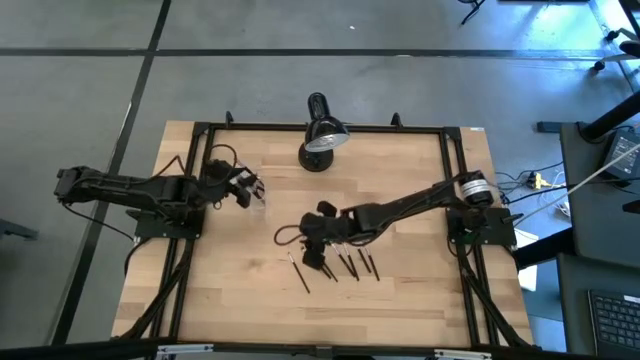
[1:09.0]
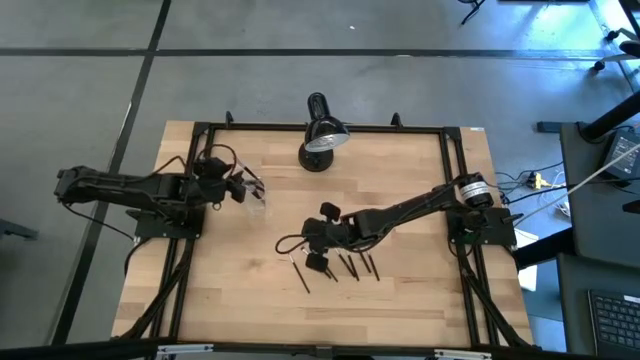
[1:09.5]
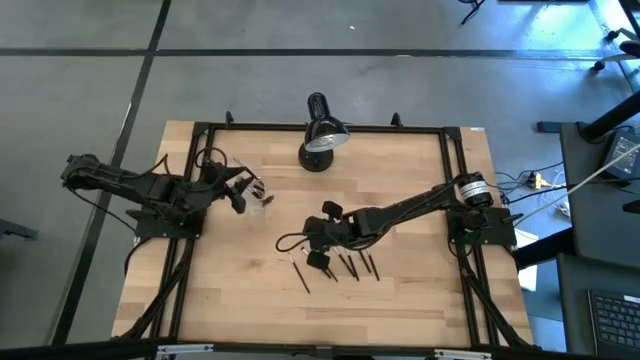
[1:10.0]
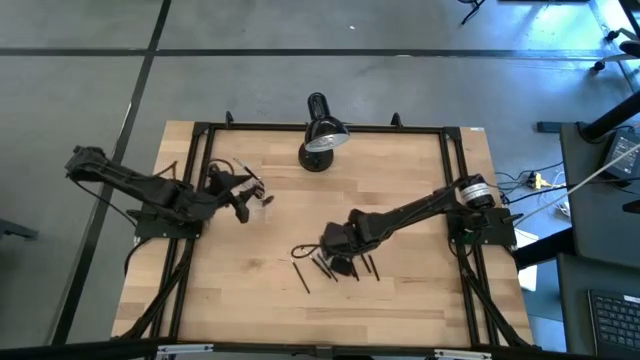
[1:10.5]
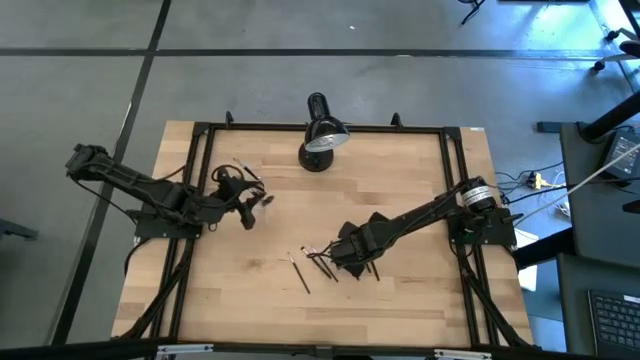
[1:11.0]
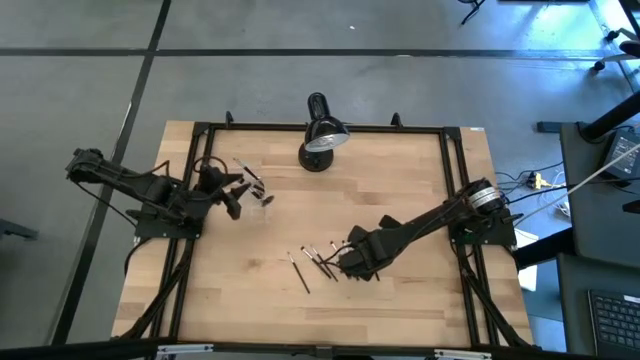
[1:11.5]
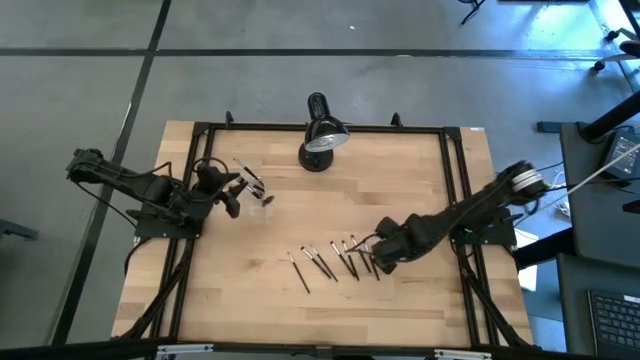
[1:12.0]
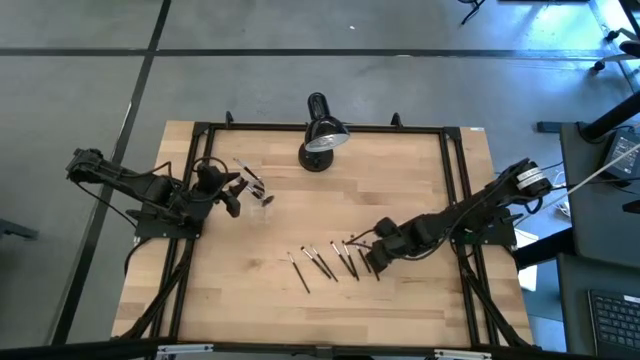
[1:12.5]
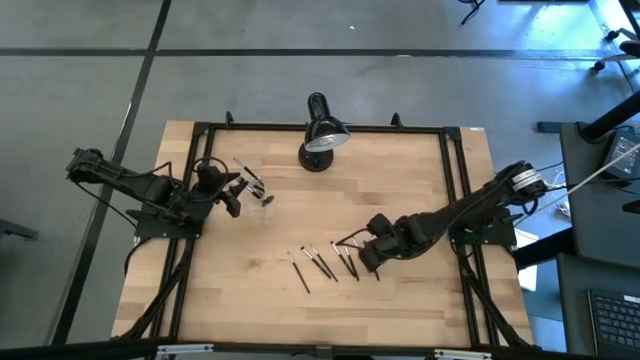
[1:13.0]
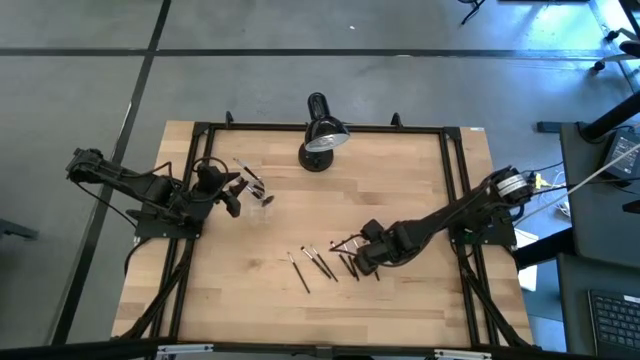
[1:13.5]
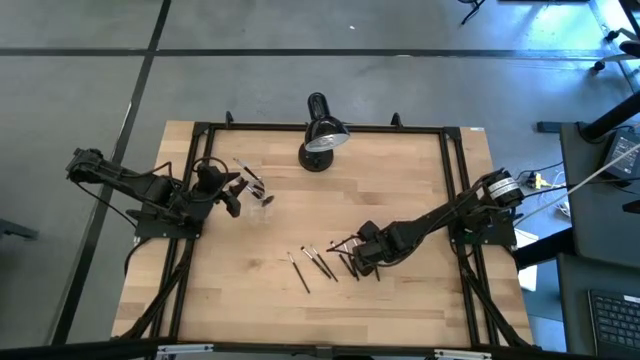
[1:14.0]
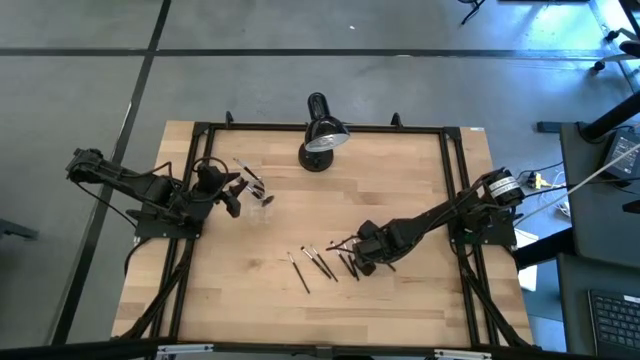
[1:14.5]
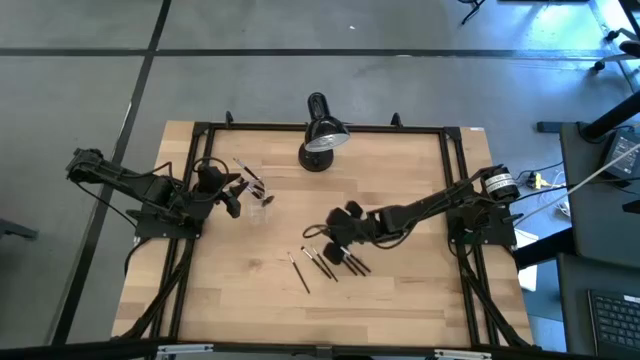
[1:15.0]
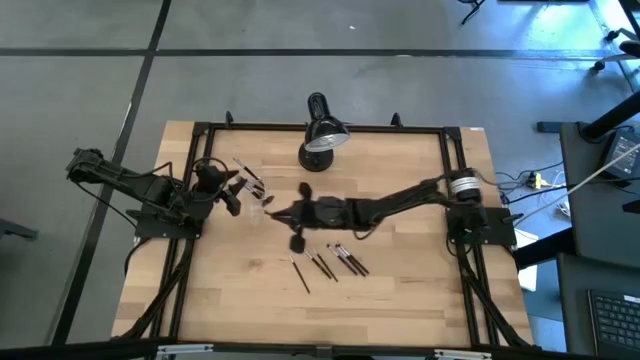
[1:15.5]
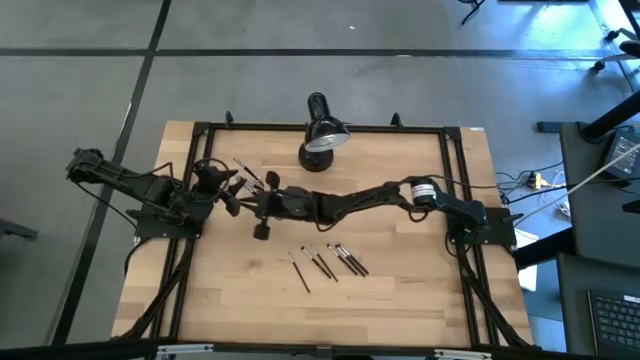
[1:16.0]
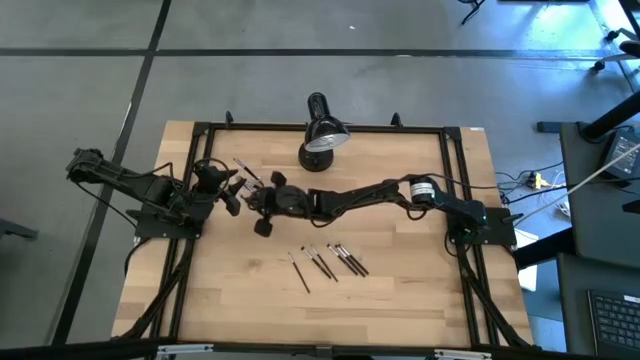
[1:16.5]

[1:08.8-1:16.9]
Task: Sort items
Put the medium angled shader brush into the transparent organizer

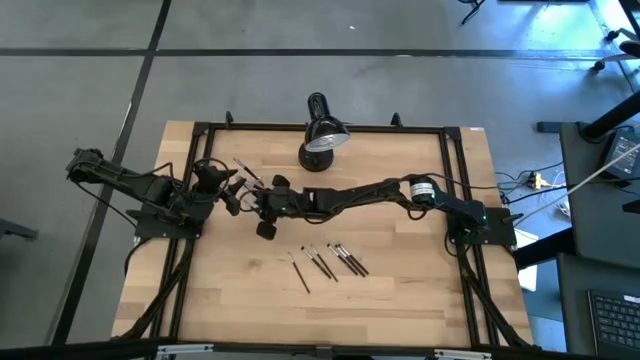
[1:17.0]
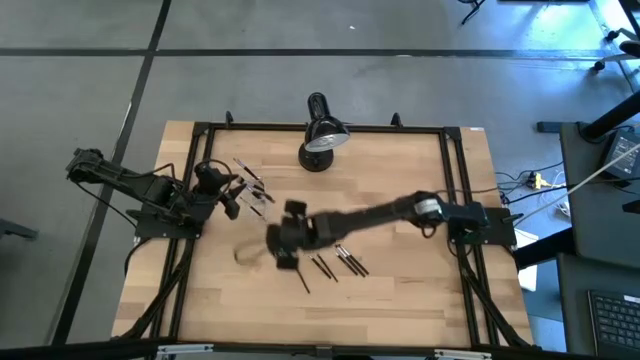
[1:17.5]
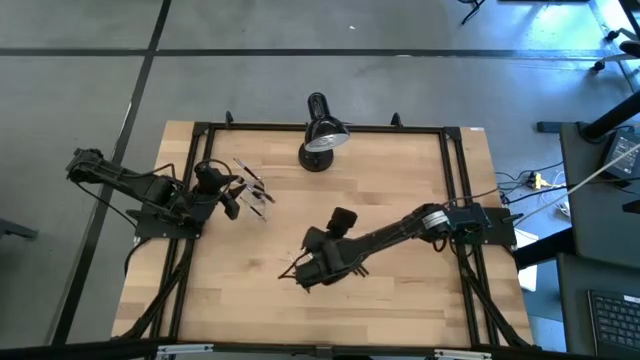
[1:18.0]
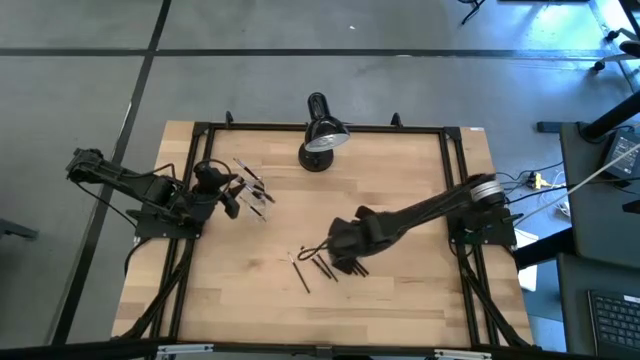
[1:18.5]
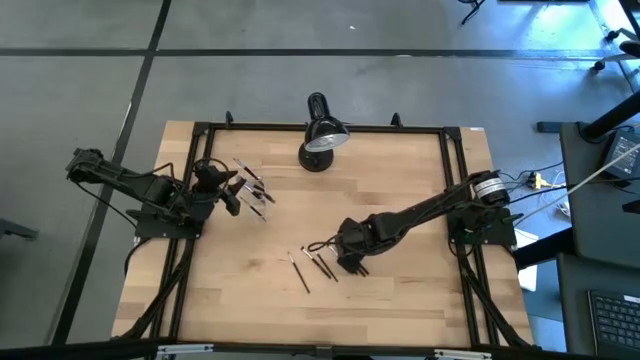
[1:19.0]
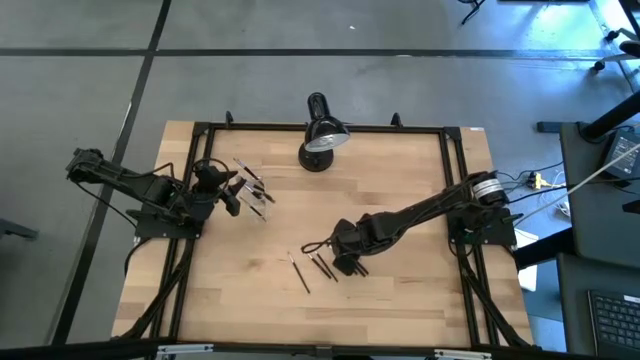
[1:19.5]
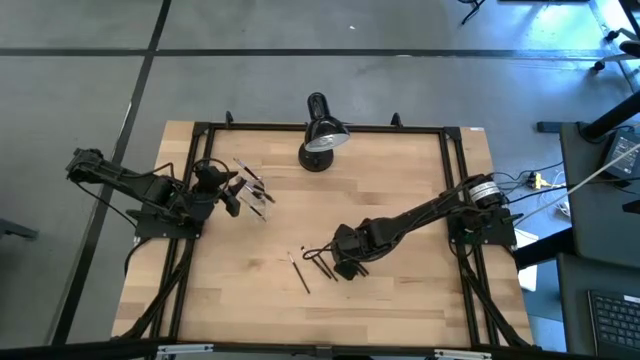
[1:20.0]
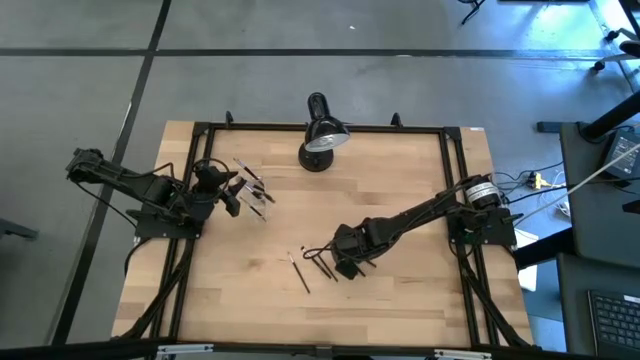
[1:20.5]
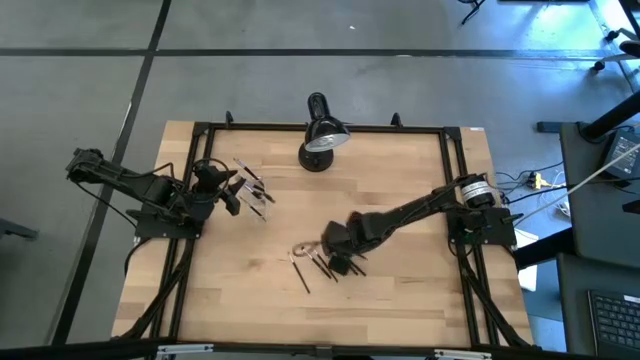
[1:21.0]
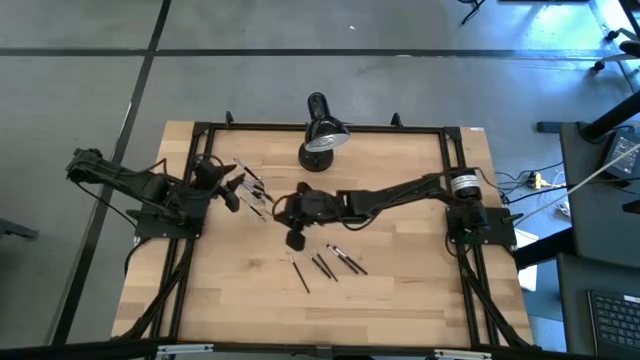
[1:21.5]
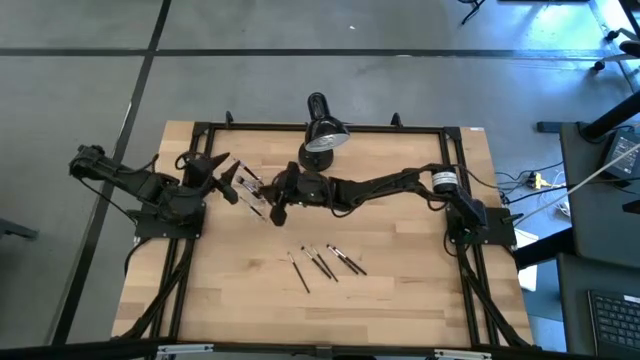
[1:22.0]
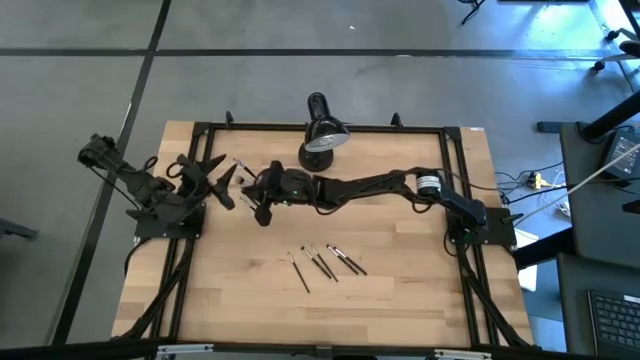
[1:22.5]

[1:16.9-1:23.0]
Put the eyeshadow brush into the transparent organizer

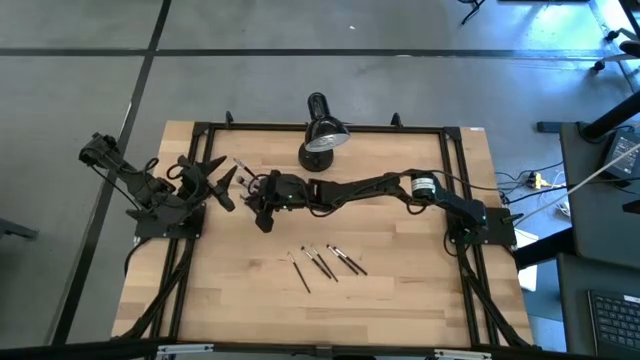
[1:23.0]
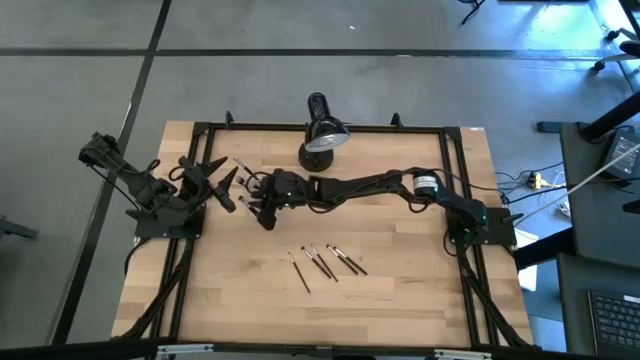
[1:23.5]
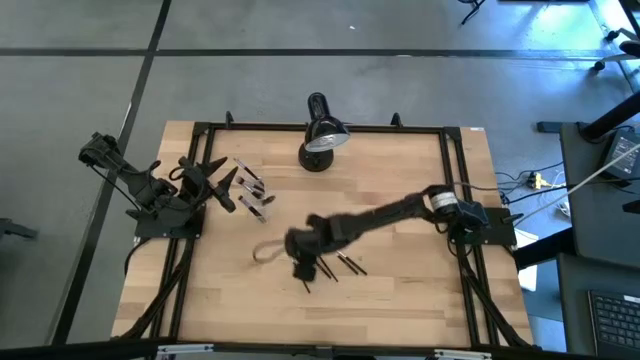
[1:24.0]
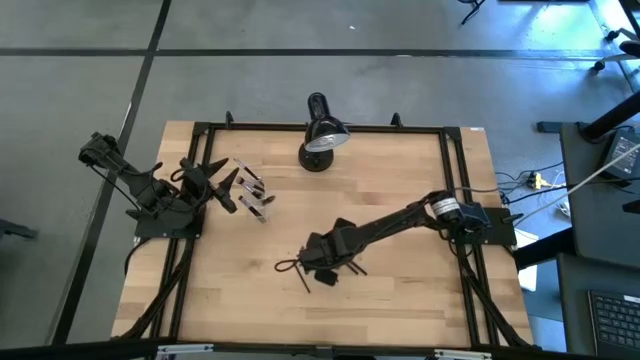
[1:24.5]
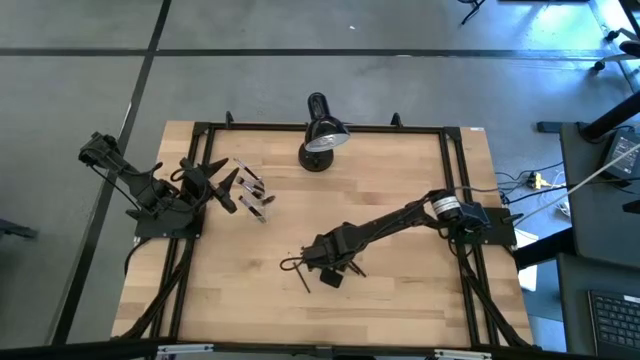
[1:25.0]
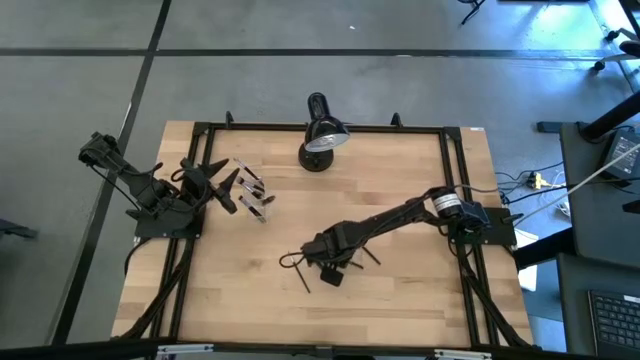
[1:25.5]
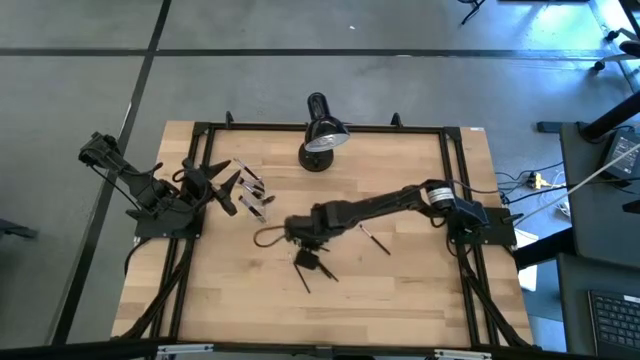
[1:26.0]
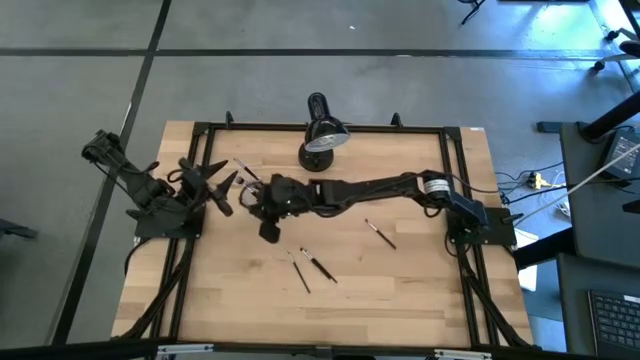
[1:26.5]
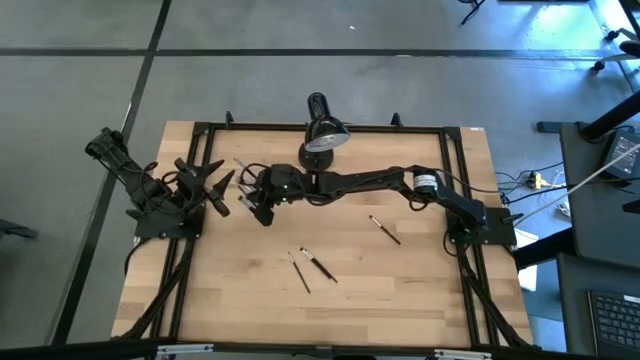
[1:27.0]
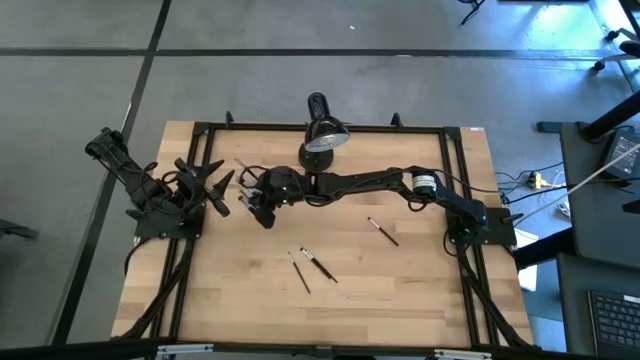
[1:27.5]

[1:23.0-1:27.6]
Put the medium angled shader brush into the transparent organizer

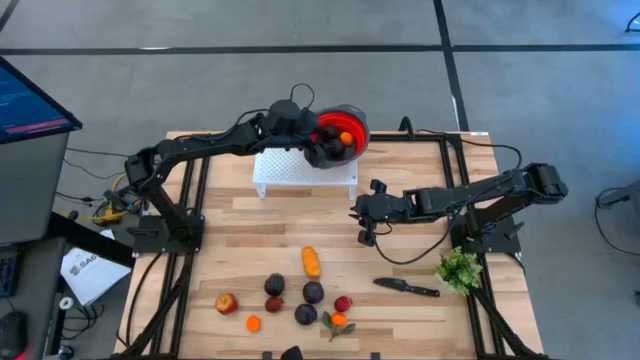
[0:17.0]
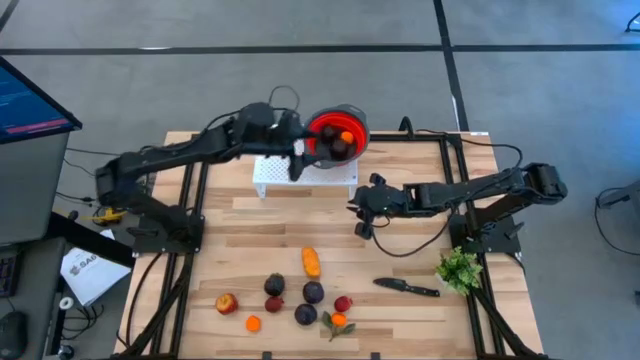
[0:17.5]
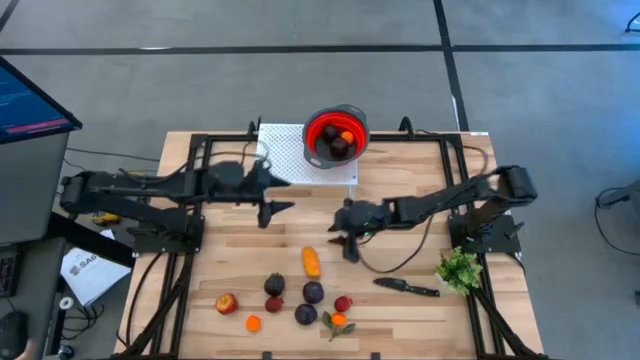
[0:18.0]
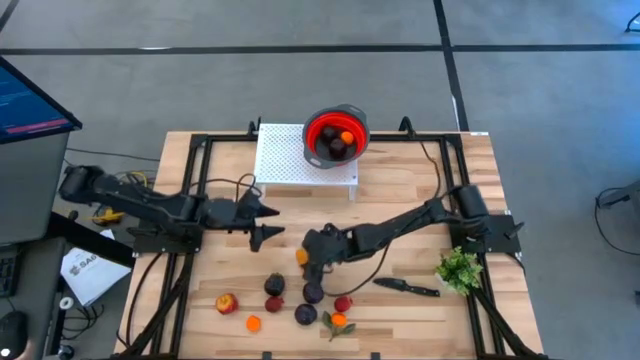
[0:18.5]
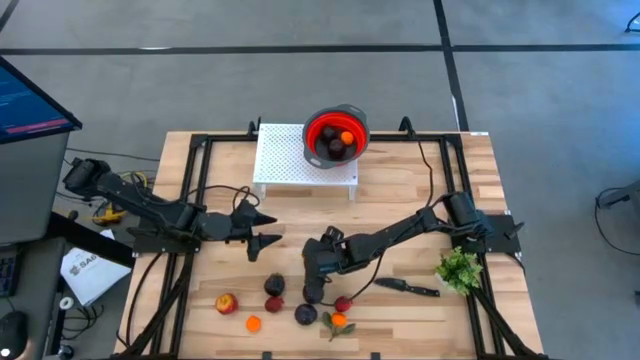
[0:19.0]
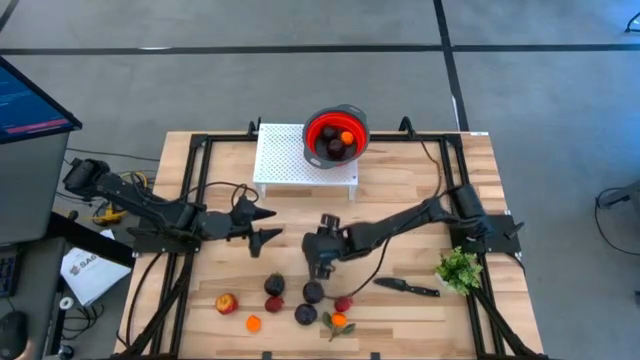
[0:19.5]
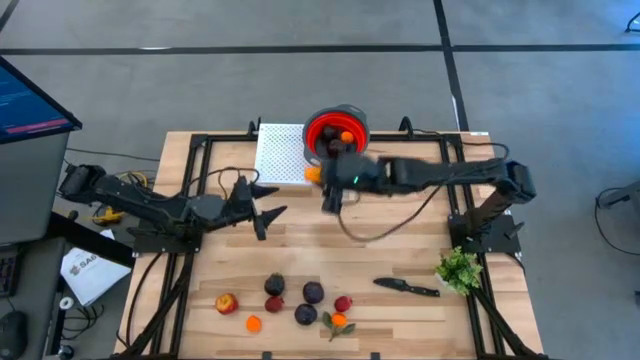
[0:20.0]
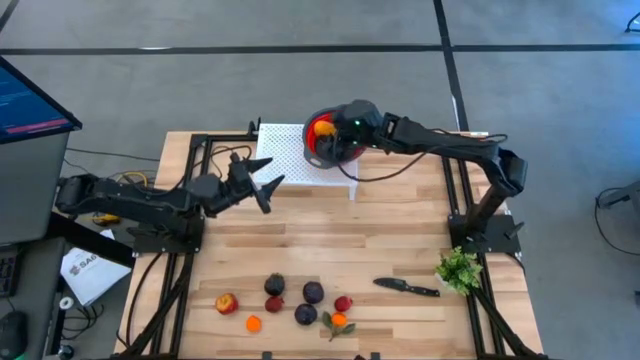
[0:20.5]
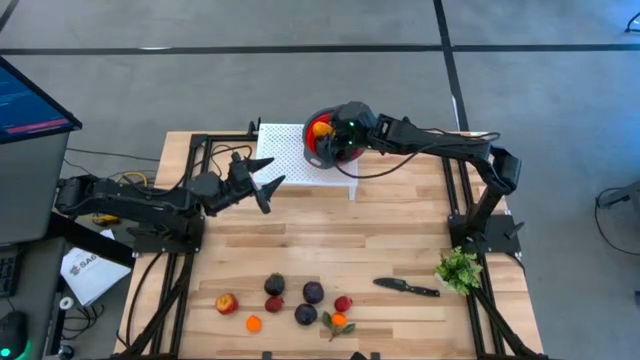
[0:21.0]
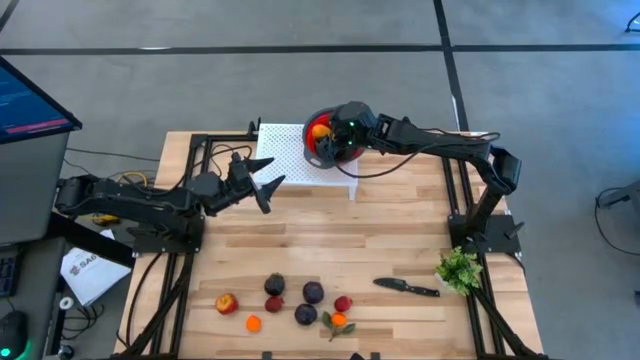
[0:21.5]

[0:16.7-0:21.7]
Task: Pick & Place Fruit
Put the potato into the red strainer on the shelf
